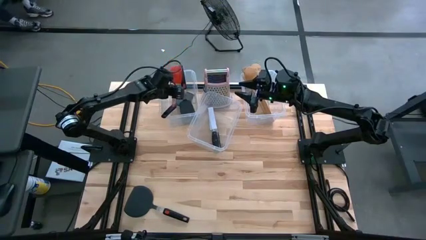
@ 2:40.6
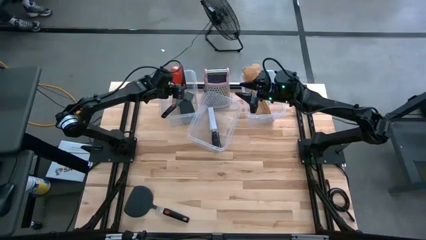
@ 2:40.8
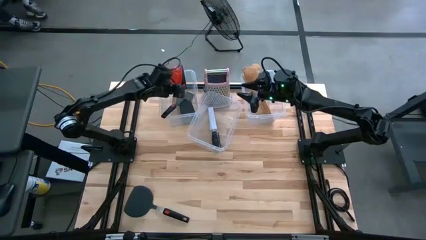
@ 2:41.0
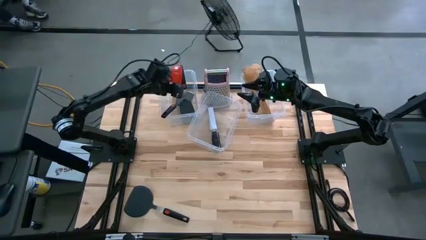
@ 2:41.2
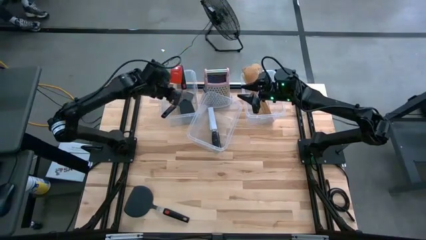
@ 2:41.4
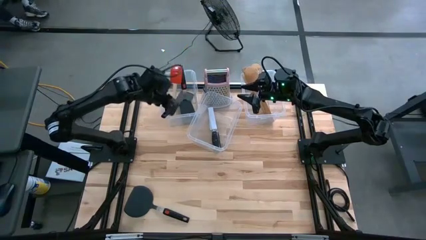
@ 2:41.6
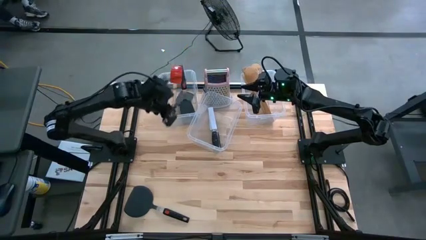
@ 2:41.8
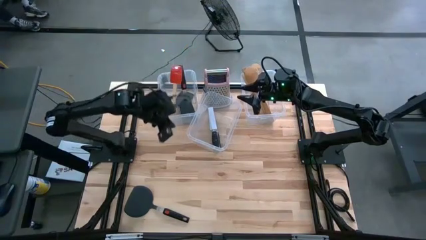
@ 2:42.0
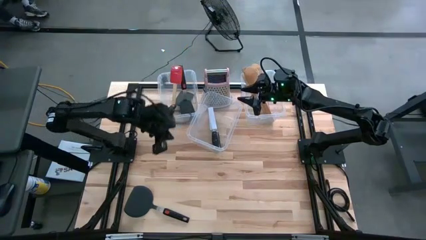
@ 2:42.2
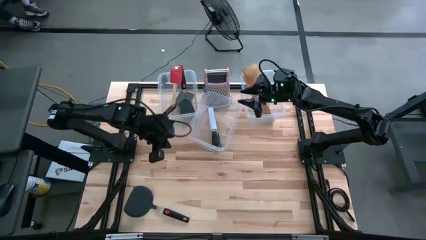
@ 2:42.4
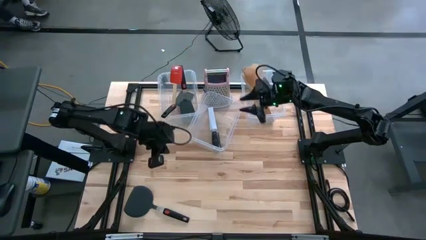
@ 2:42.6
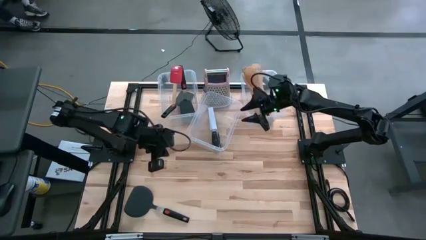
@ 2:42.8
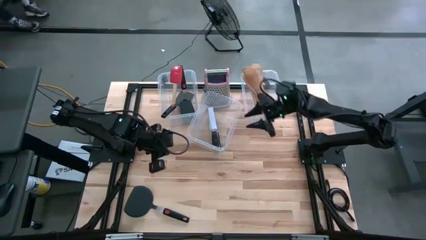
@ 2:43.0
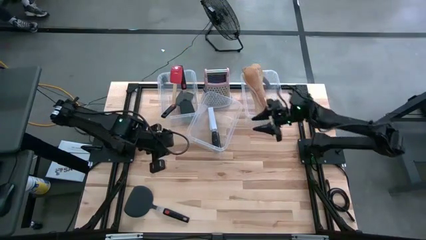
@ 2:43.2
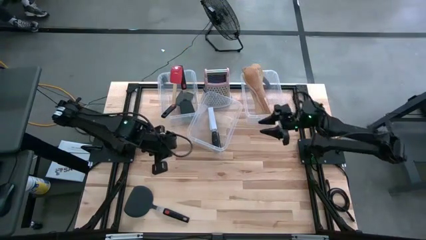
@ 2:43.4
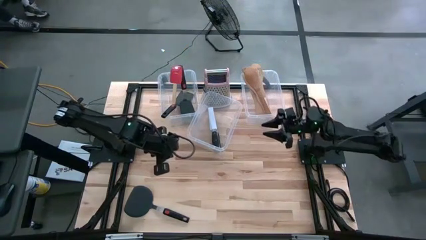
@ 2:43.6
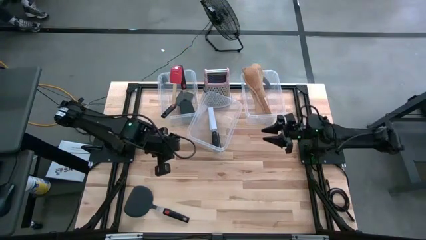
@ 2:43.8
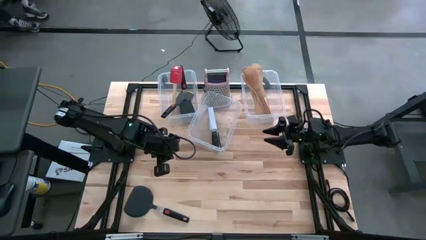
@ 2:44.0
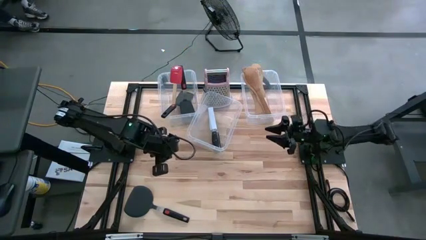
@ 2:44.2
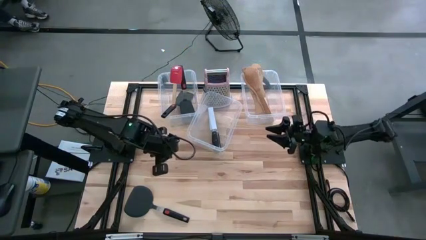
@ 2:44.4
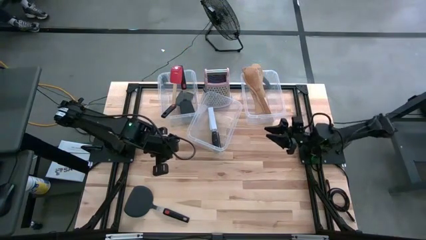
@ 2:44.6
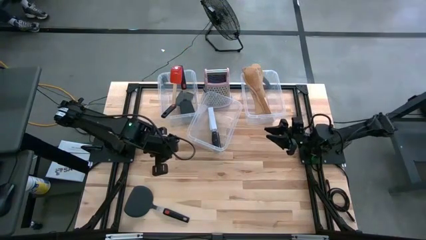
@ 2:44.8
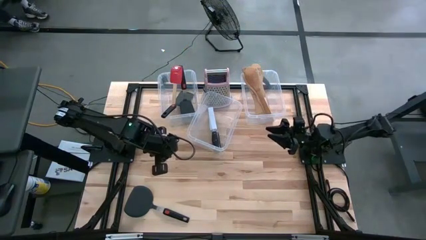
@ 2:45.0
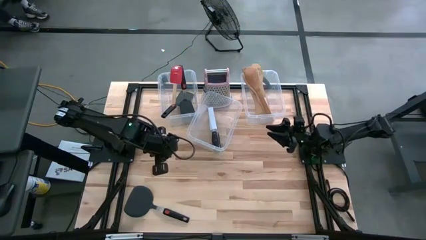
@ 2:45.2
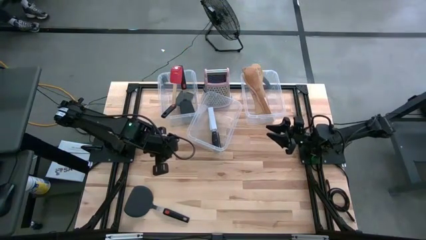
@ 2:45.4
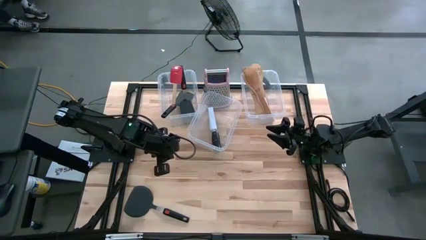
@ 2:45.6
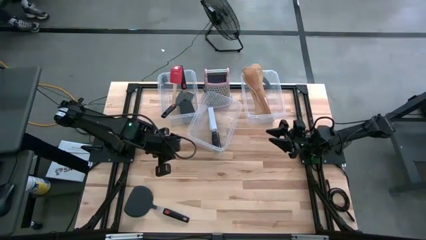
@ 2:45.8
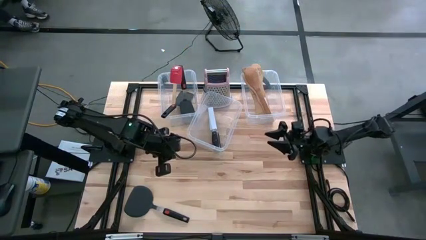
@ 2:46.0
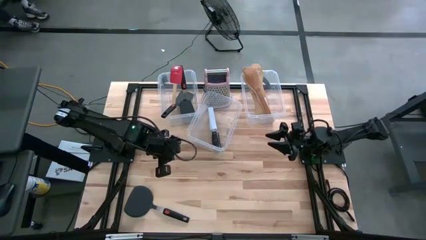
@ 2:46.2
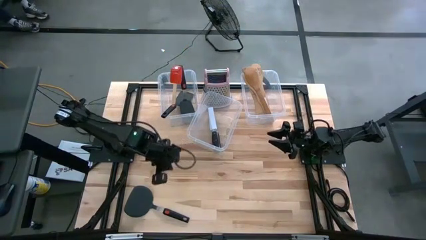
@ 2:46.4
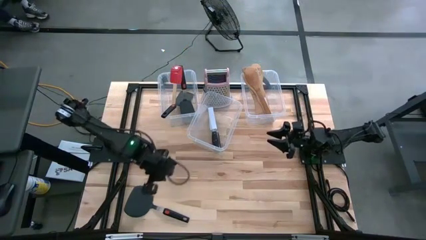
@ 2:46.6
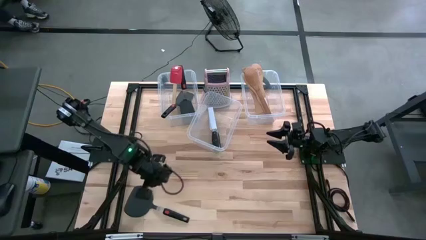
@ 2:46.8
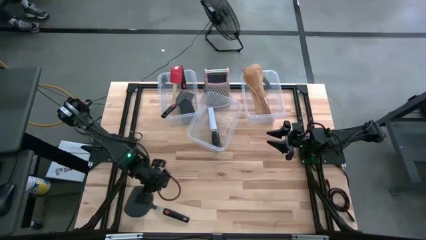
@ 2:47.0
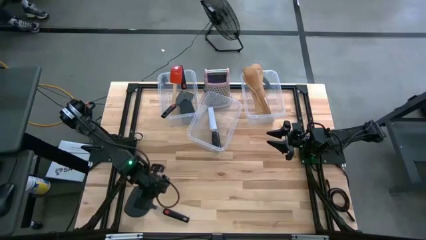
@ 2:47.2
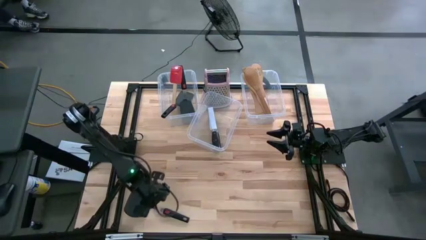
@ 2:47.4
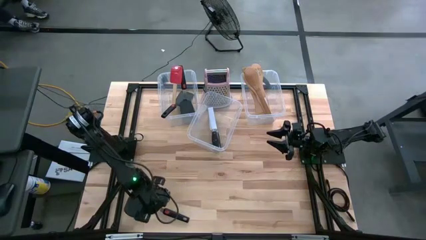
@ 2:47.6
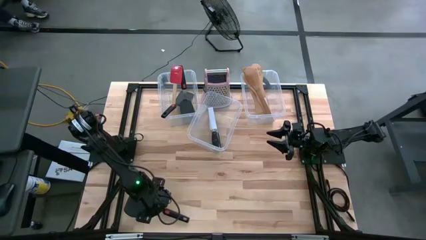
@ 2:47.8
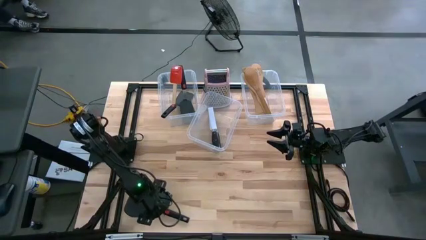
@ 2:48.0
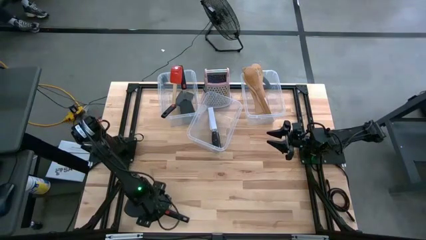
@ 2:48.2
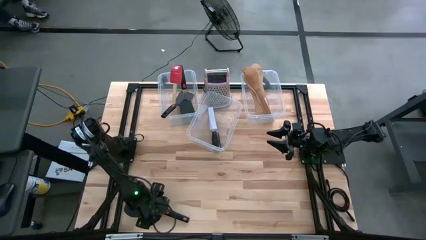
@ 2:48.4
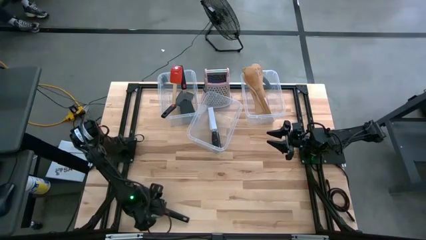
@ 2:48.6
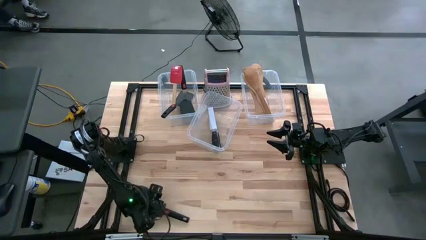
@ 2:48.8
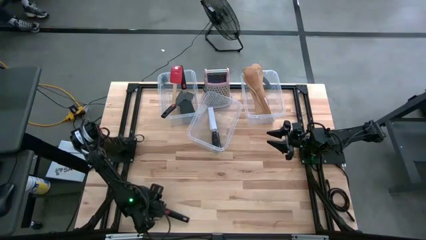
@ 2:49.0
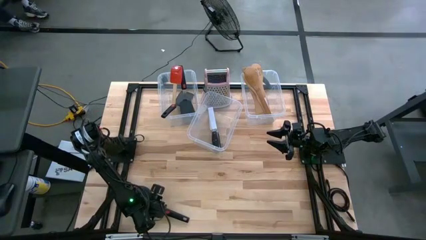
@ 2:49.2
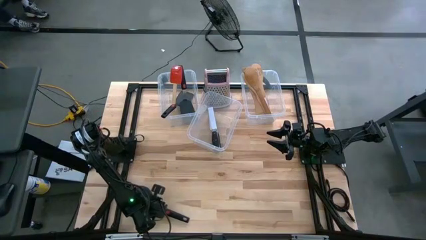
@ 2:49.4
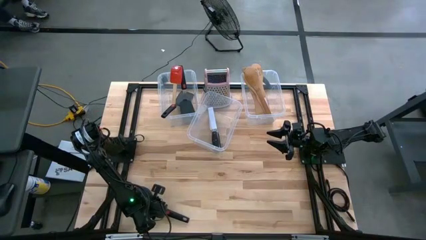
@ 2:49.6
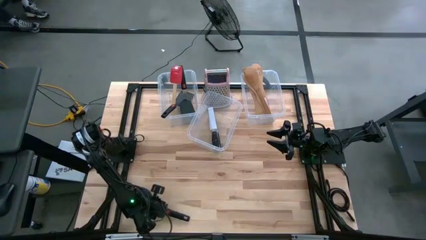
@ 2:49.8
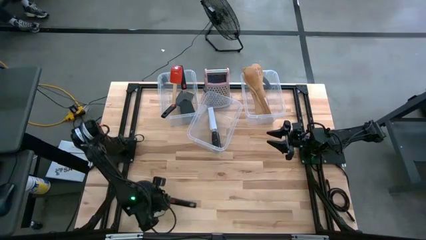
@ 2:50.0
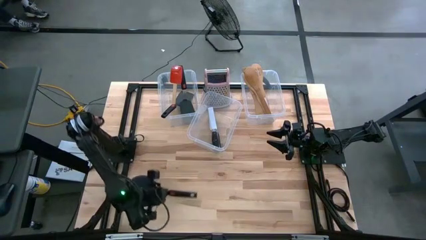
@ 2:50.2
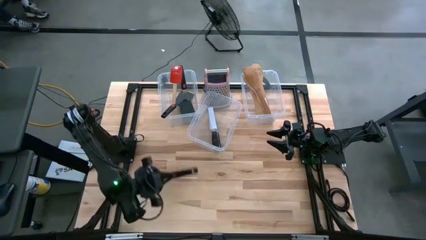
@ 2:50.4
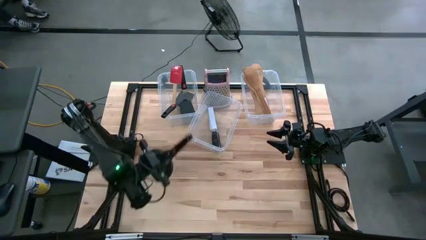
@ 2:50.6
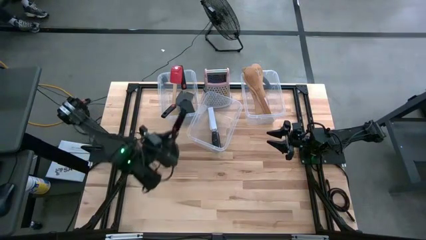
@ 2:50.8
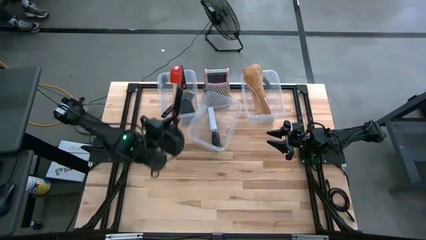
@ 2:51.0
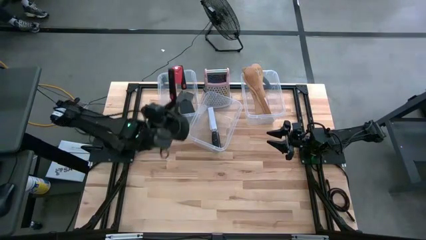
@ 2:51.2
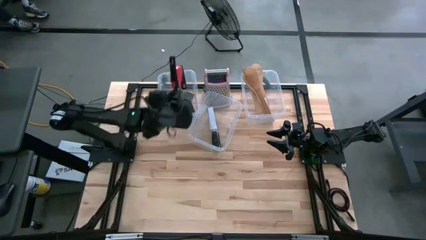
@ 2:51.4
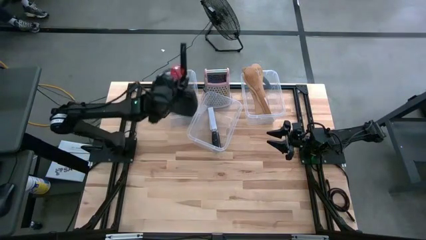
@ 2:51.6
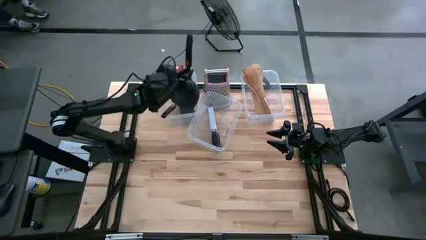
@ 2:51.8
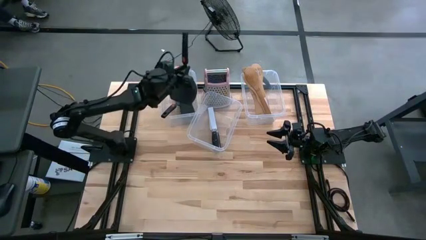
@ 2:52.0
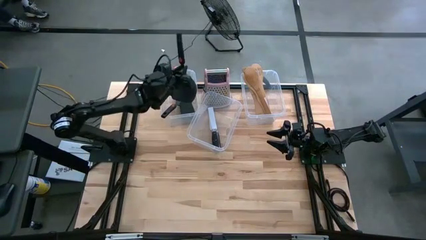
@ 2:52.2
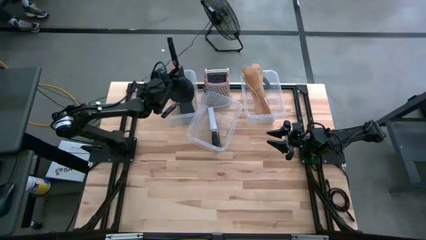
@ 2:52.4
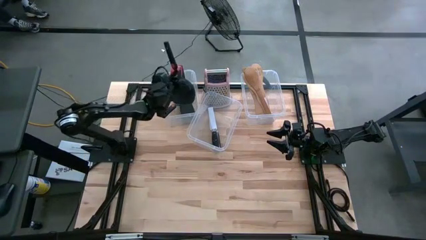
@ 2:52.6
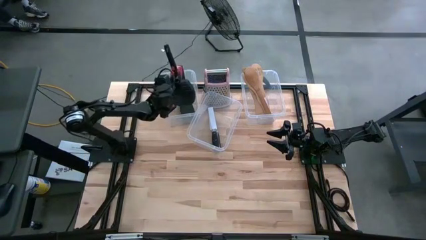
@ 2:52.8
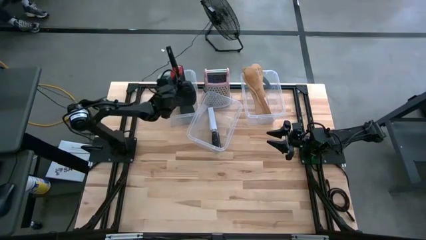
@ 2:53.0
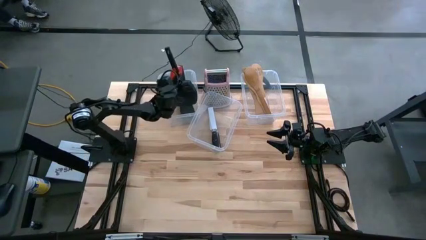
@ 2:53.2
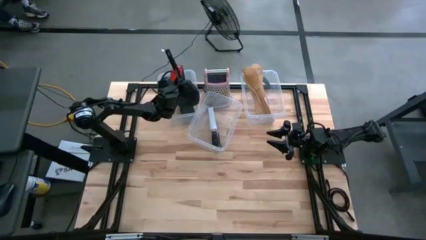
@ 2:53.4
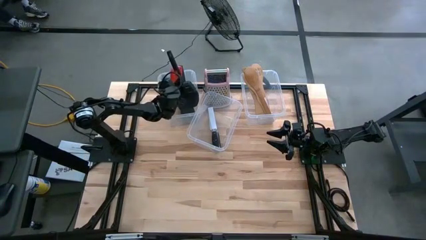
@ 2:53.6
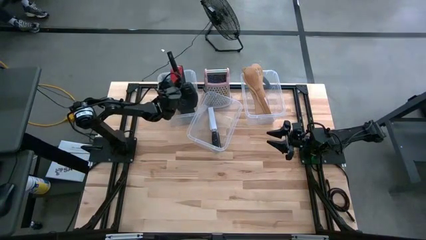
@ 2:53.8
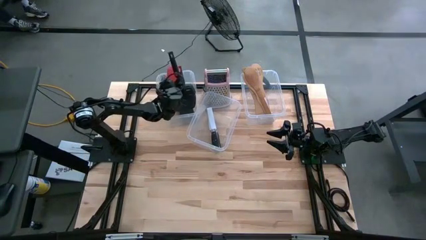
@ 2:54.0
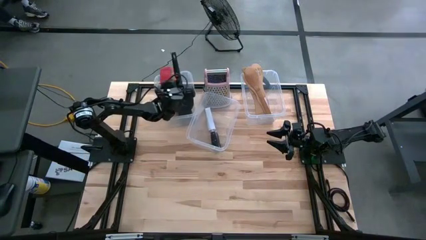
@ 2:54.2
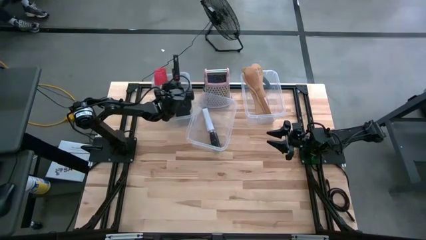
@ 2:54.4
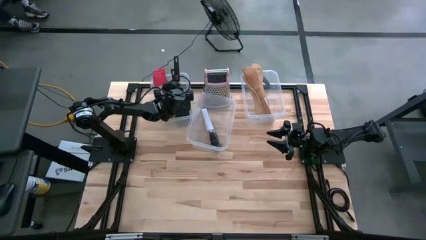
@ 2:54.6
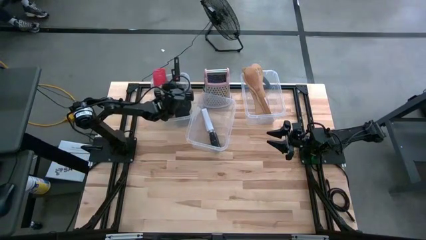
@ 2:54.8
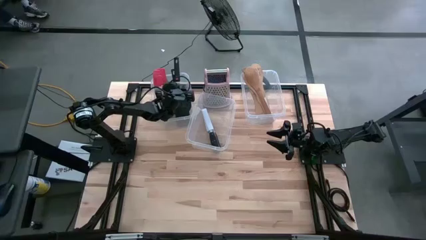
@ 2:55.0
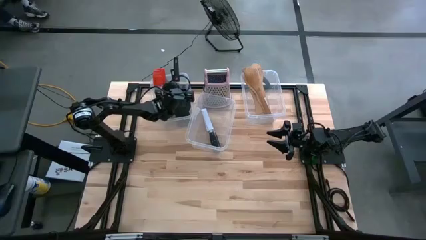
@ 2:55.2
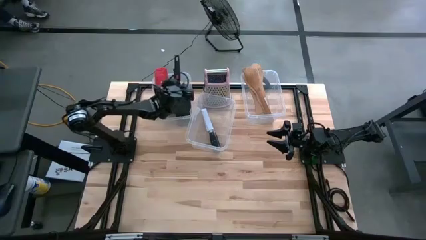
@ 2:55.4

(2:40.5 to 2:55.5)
Task: Pick & Place Kitchen Items
Put the black spatula into the left transparent bin
